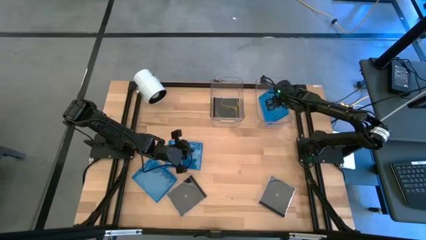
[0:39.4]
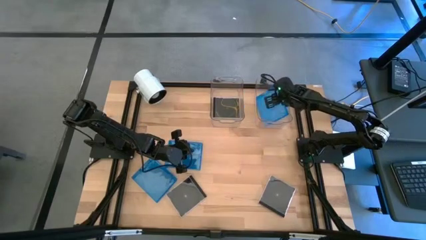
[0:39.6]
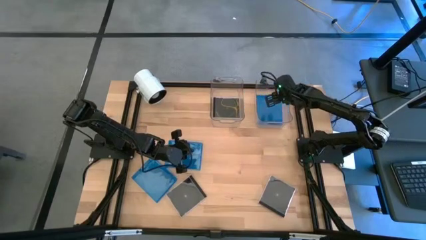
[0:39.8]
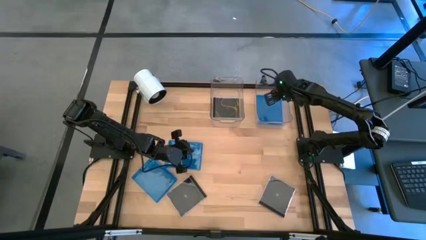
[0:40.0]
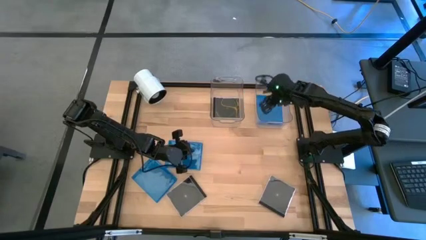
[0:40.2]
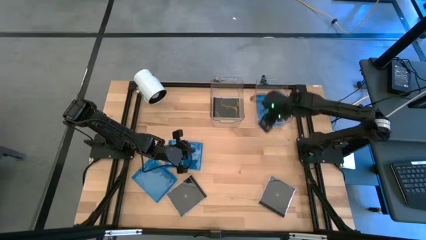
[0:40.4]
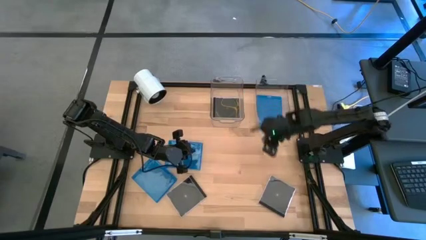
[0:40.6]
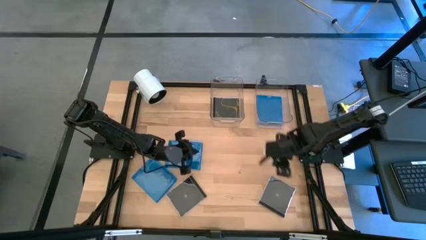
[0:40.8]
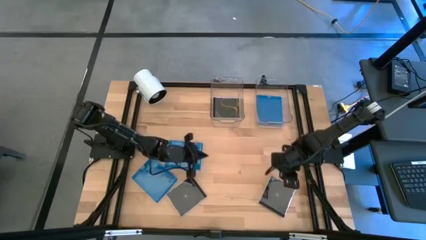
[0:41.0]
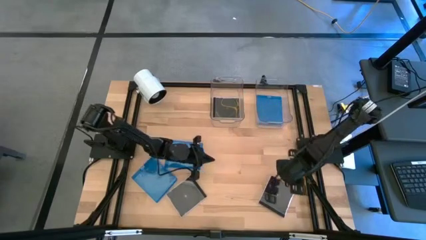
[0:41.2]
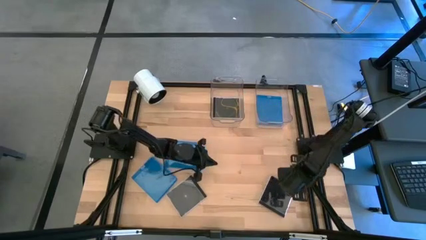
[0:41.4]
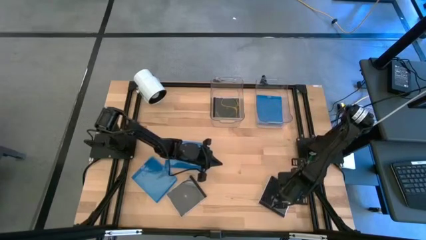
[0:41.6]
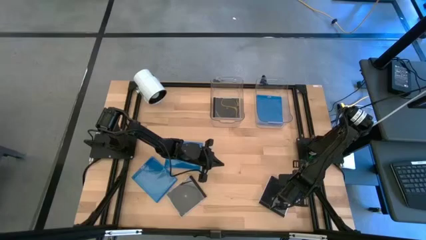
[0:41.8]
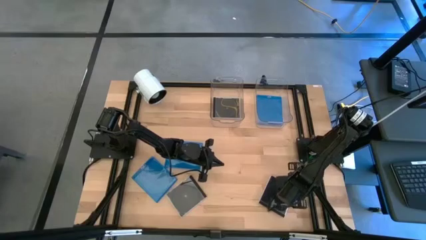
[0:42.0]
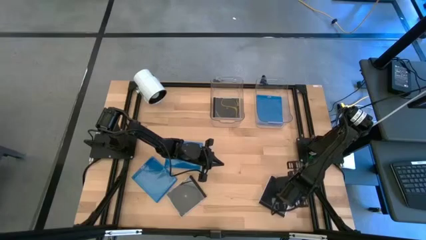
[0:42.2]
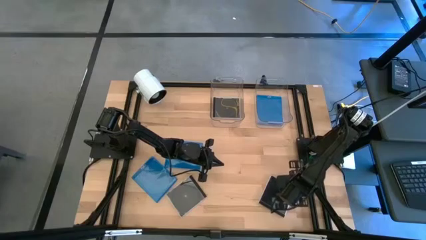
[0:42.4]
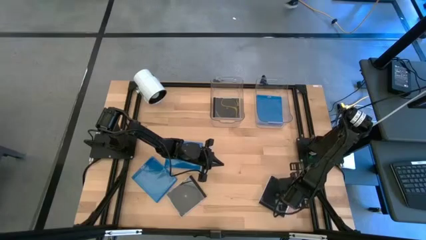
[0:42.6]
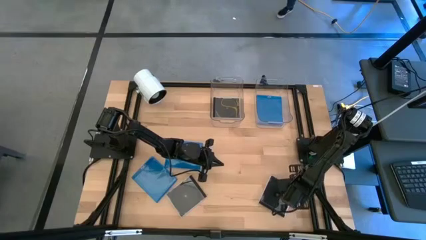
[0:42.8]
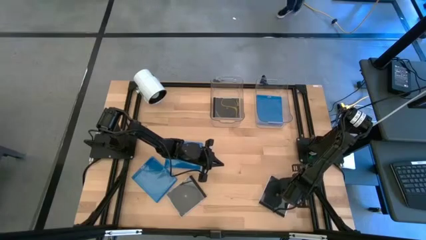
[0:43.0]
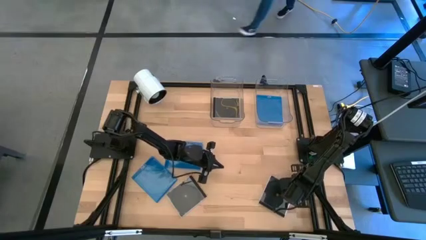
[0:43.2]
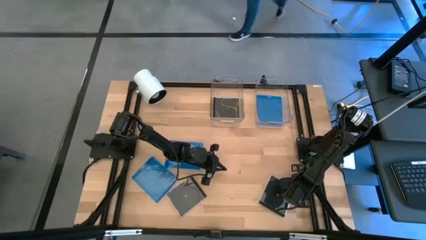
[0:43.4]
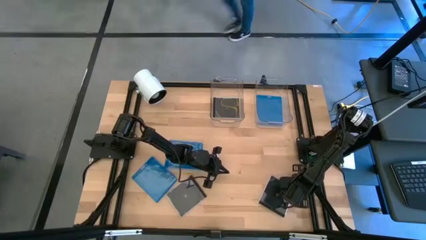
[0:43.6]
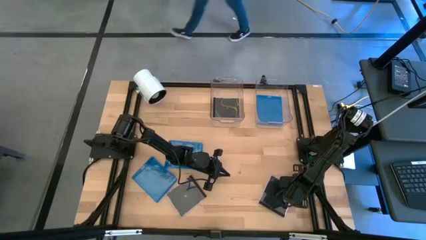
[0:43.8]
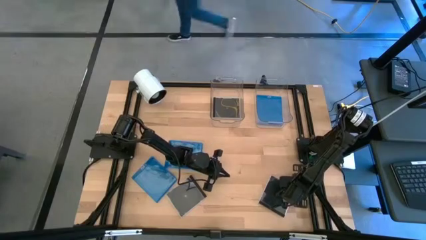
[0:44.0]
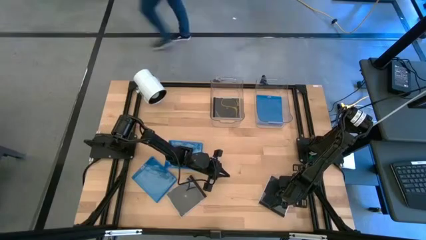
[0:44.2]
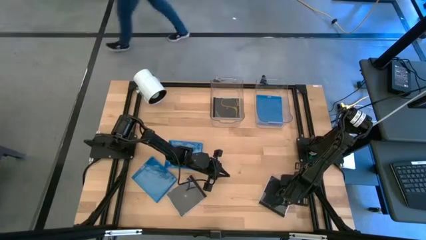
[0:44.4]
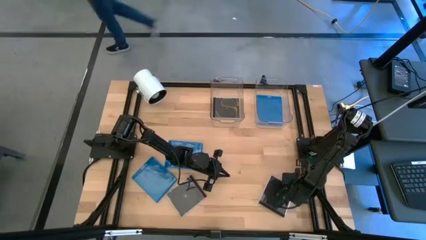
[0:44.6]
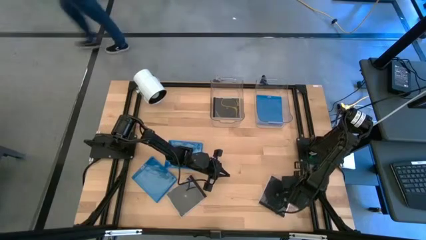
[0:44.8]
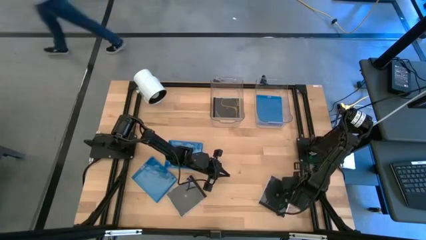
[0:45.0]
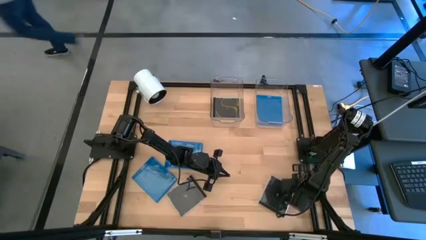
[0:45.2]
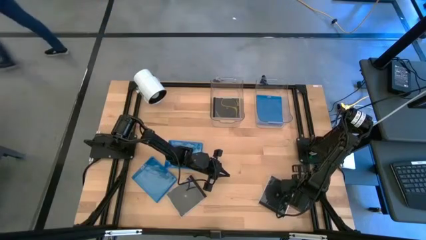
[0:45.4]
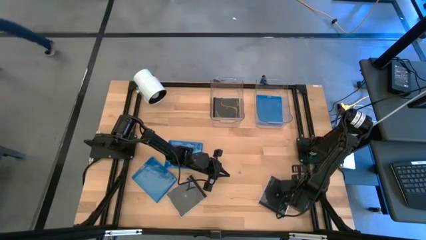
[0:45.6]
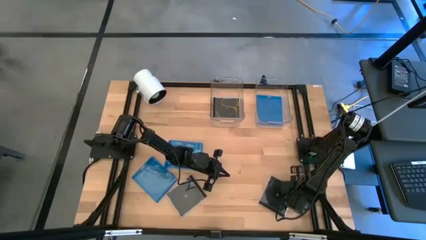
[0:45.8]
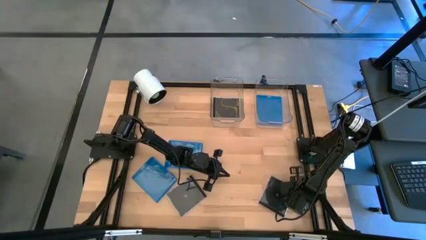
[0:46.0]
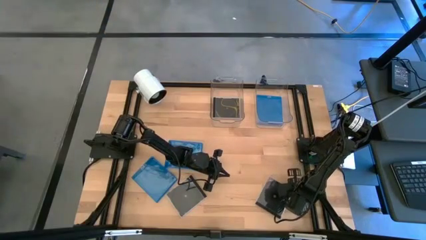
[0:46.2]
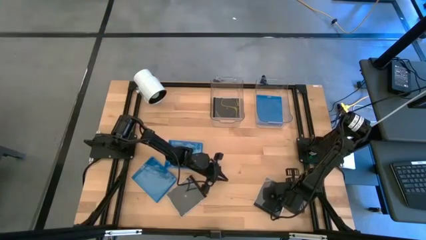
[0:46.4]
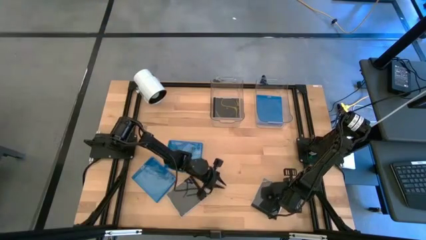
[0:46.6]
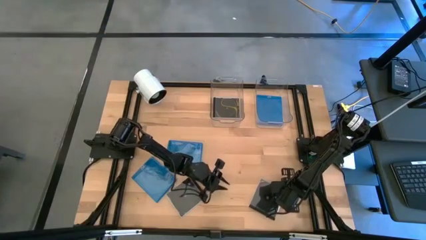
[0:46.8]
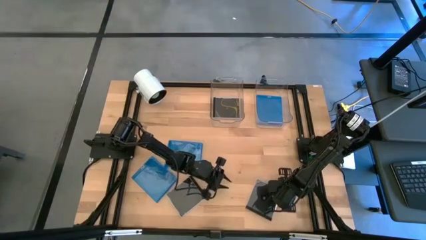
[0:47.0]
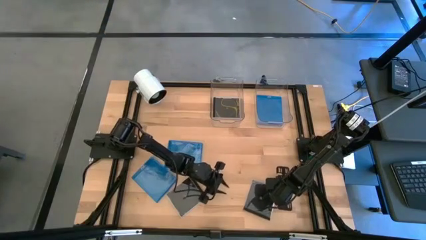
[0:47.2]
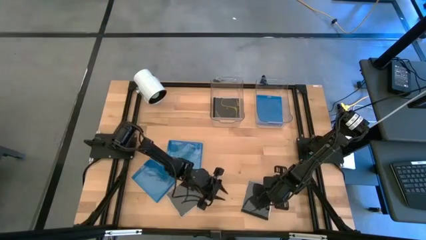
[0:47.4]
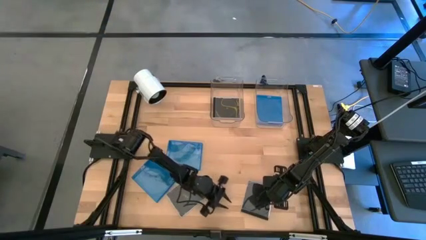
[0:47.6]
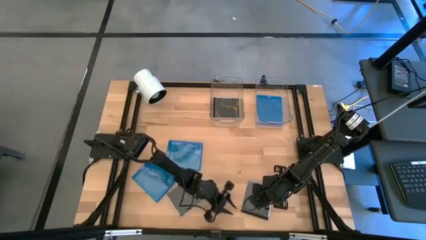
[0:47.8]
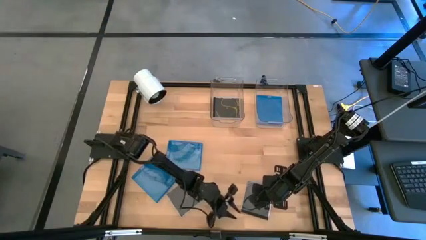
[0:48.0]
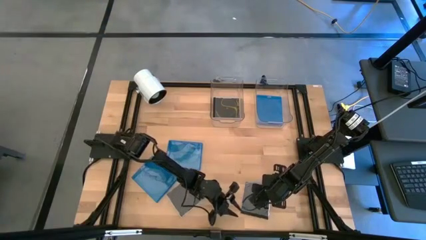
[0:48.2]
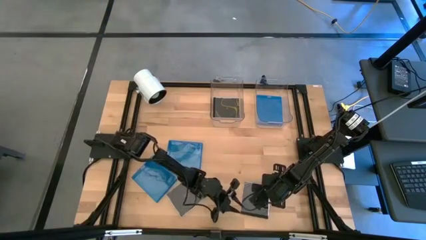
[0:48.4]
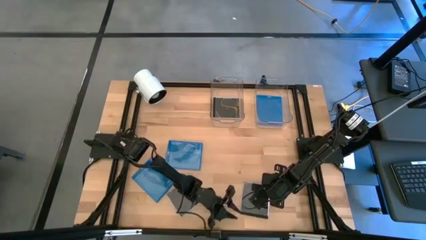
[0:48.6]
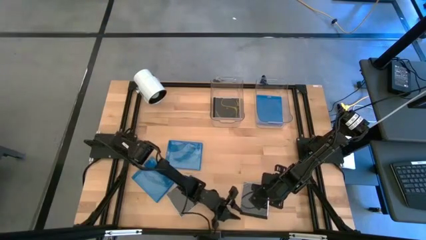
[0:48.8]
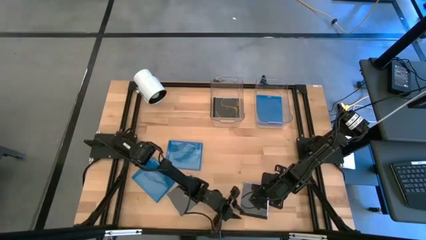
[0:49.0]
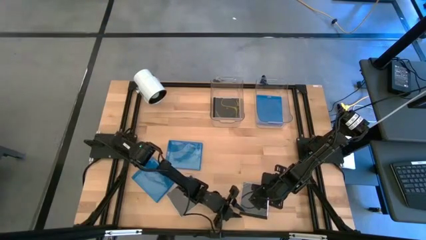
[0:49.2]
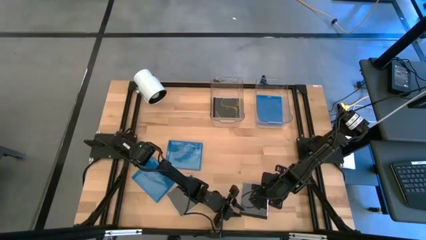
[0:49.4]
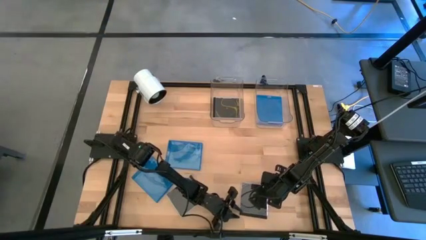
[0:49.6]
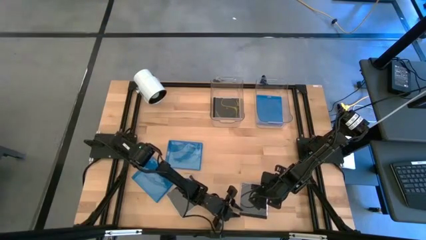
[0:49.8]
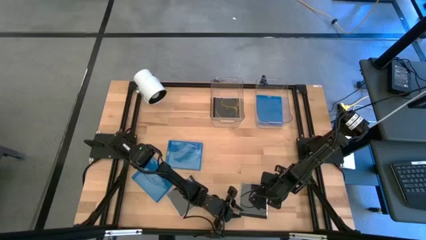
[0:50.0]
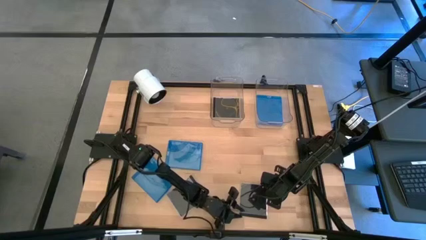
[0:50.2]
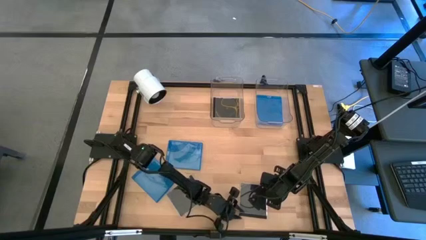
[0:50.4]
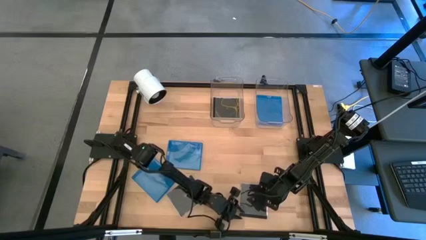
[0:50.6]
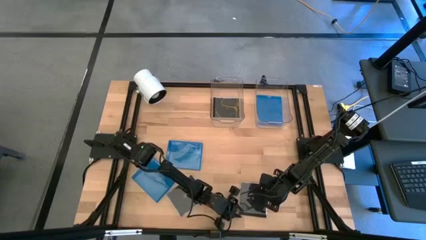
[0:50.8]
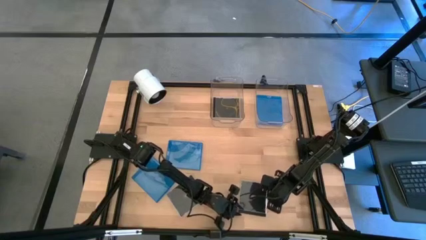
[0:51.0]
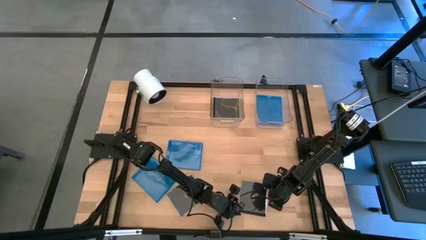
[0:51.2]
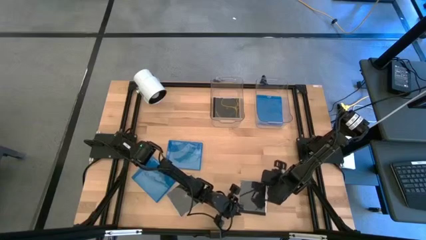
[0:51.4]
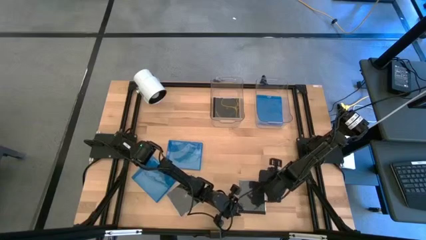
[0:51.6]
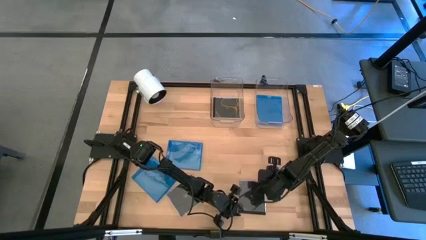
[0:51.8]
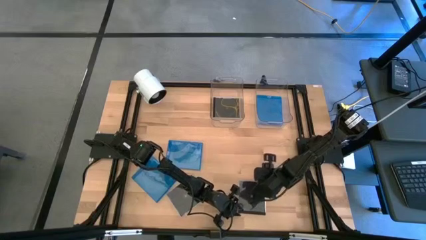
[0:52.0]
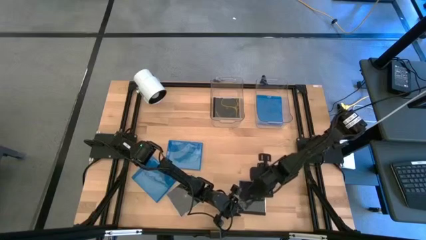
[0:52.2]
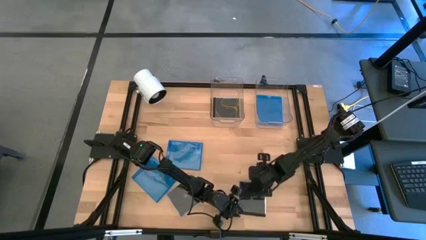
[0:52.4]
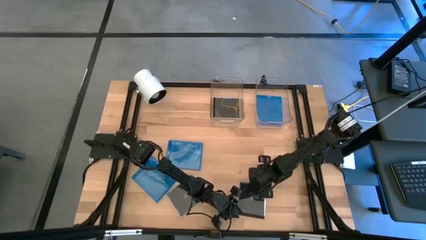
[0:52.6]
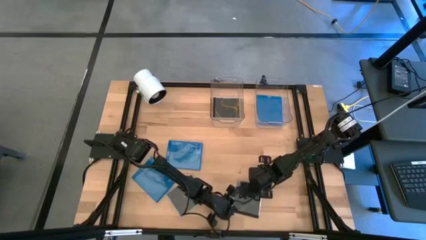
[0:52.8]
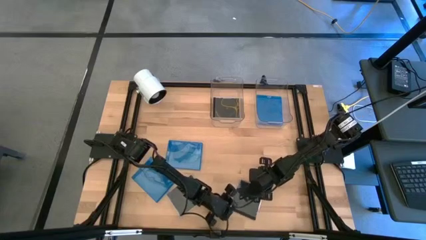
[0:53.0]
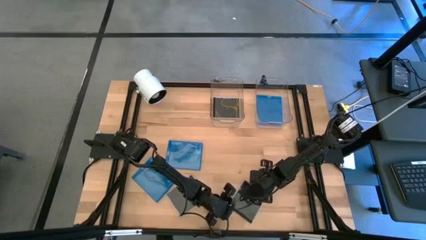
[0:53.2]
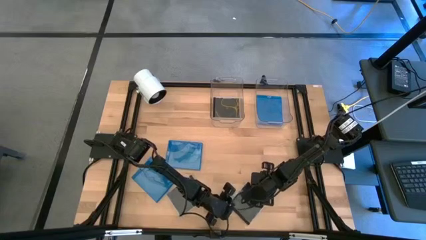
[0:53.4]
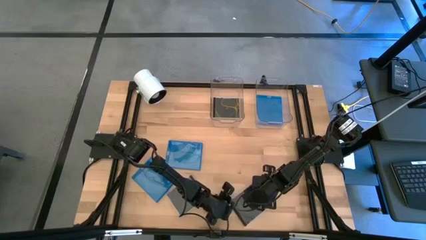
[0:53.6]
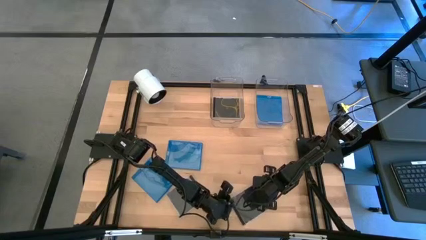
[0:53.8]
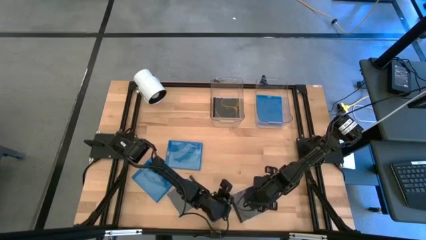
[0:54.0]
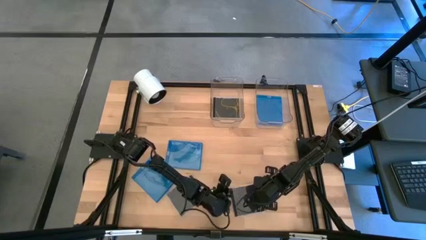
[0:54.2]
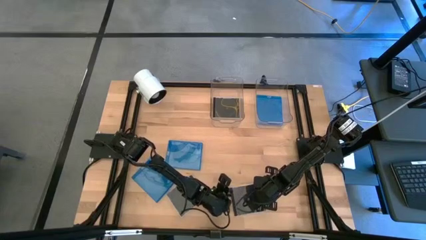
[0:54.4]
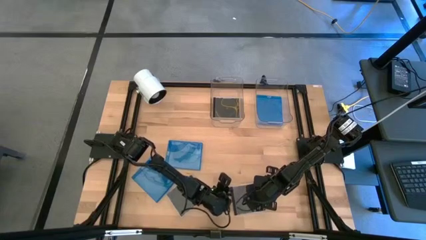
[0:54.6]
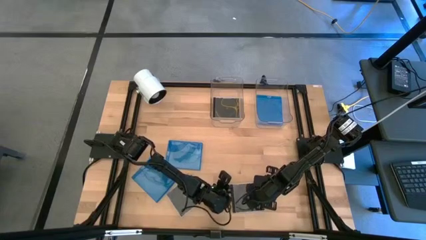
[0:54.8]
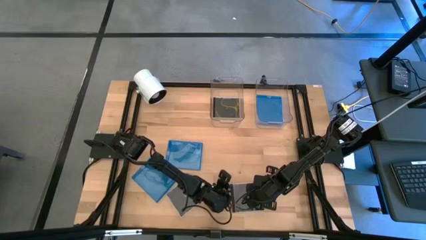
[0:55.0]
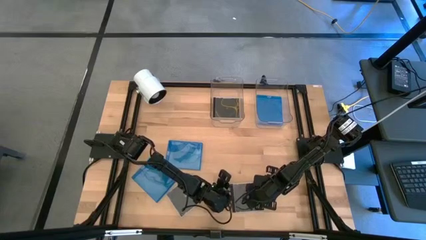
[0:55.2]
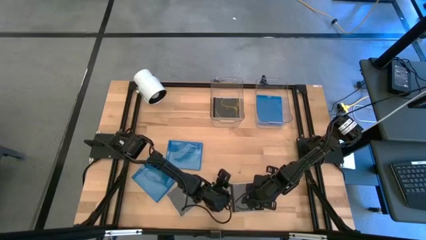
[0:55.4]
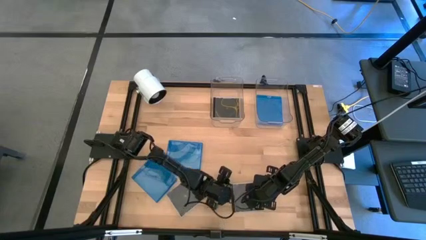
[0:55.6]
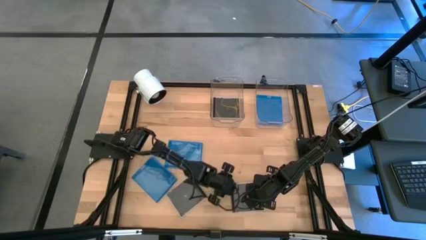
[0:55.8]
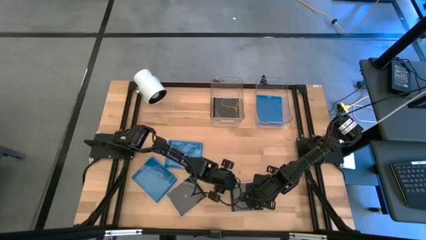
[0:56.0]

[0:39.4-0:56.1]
Task: Pick & place jewel cases by type
Put the right black CD case into the left transparent bin
